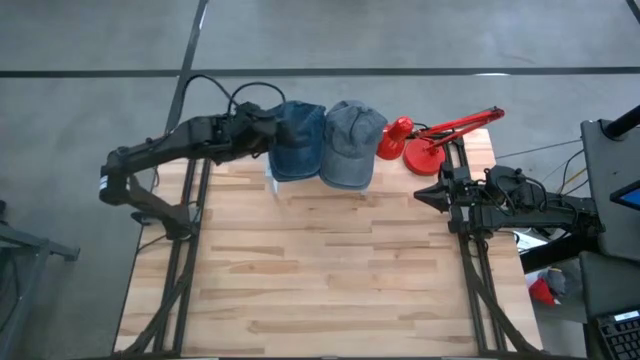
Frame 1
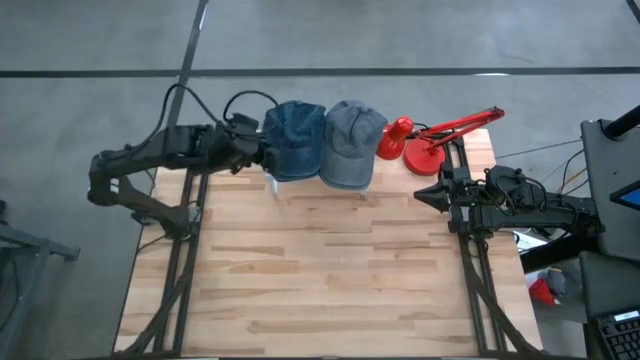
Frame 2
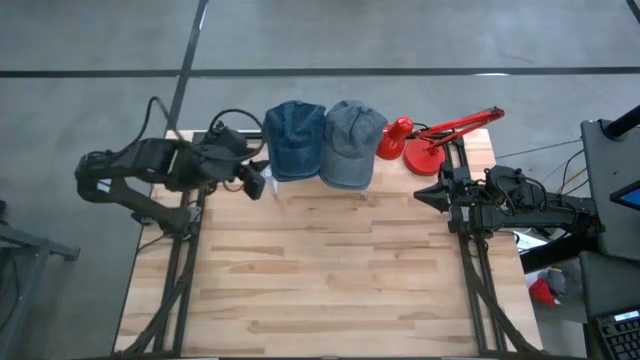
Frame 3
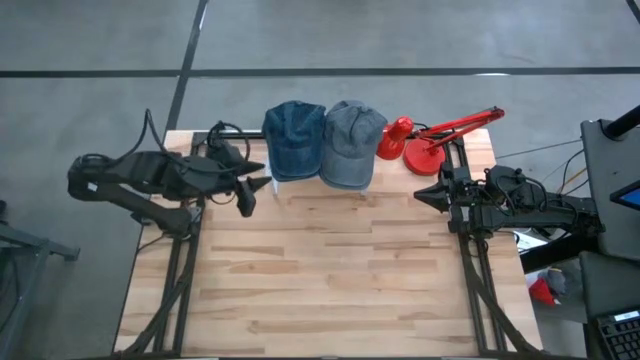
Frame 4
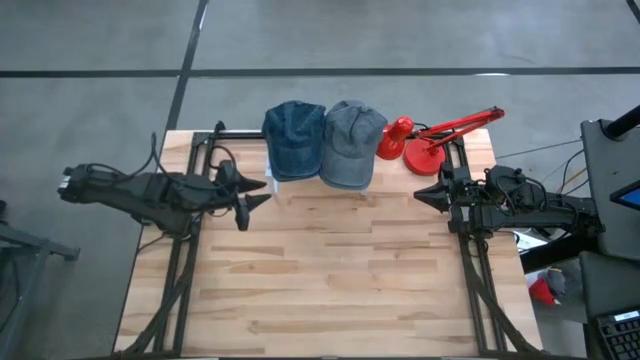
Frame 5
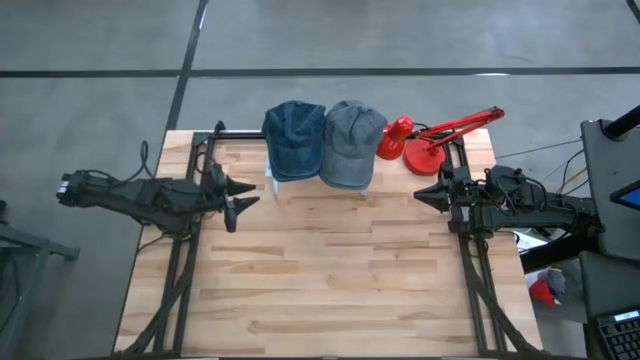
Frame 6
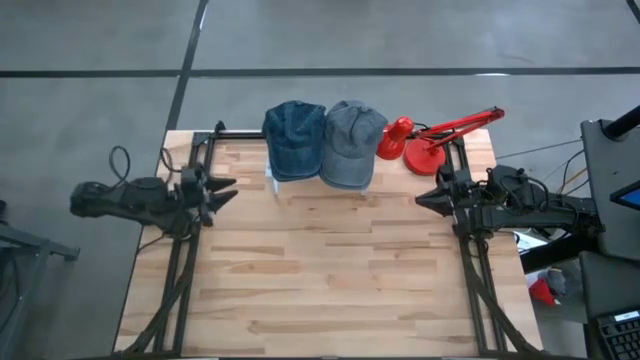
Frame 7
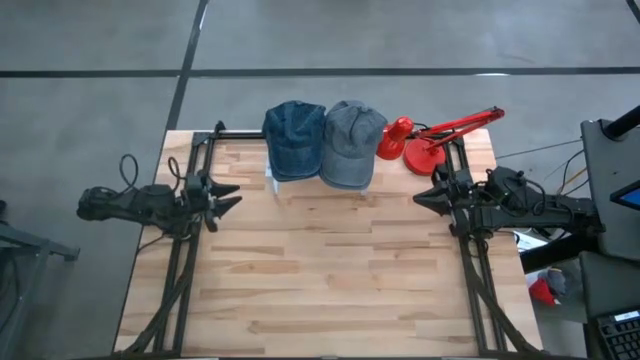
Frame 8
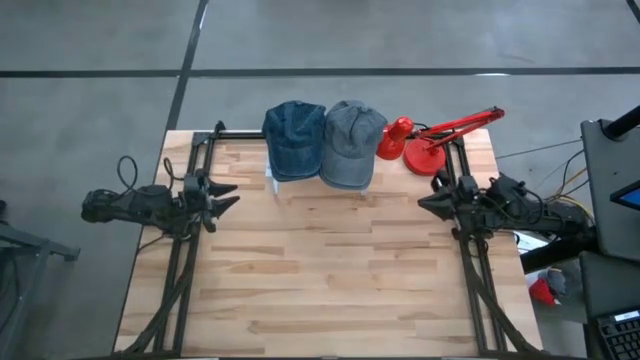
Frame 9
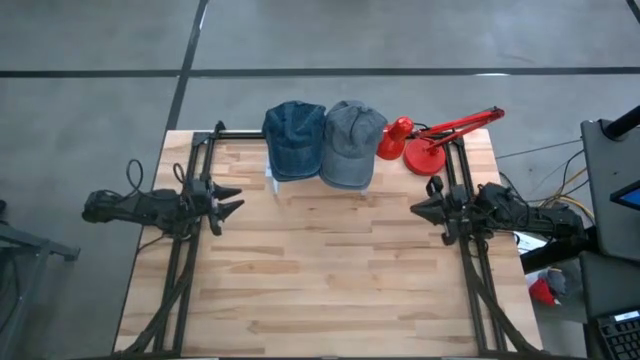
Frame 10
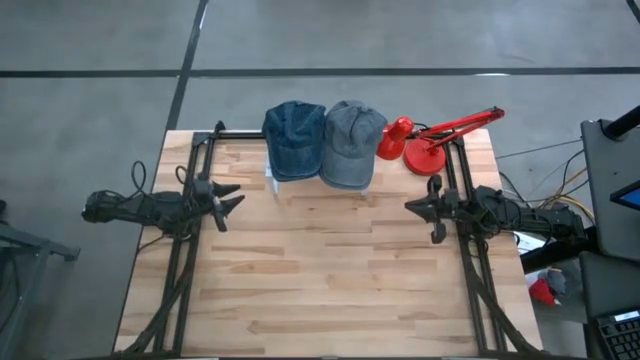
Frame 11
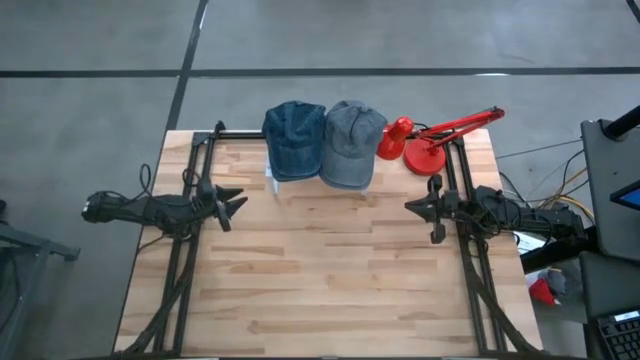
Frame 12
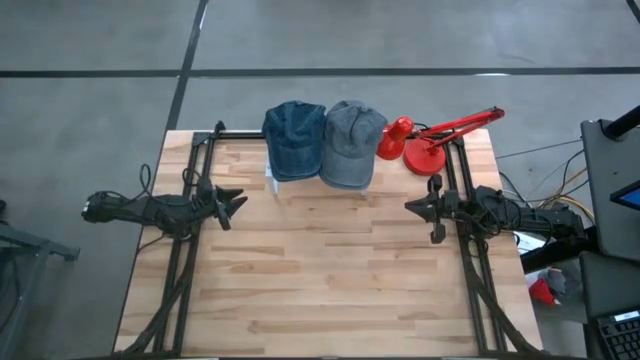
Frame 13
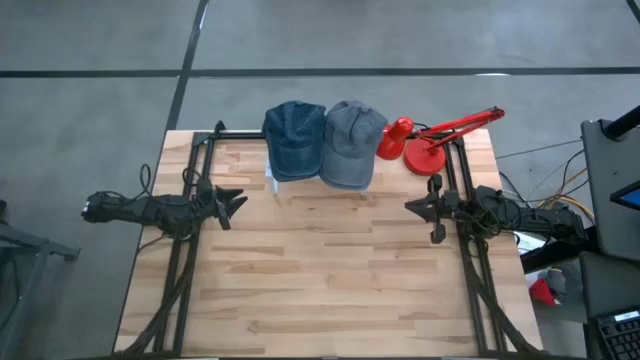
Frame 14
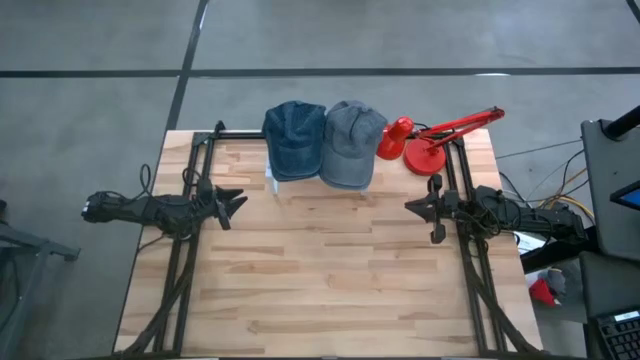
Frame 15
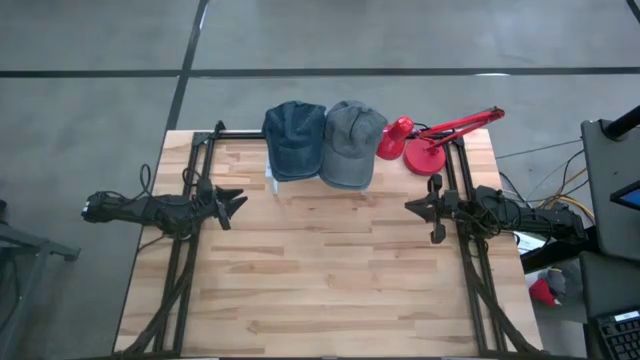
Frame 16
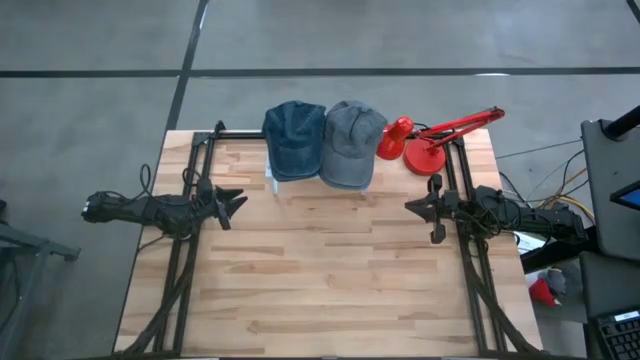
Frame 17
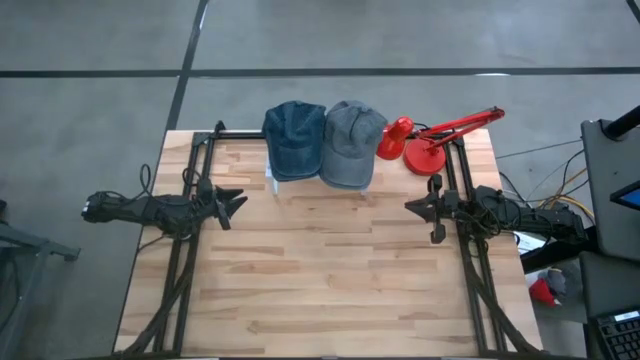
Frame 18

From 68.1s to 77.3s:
Task: Pick & Place hat
Return to Home Position

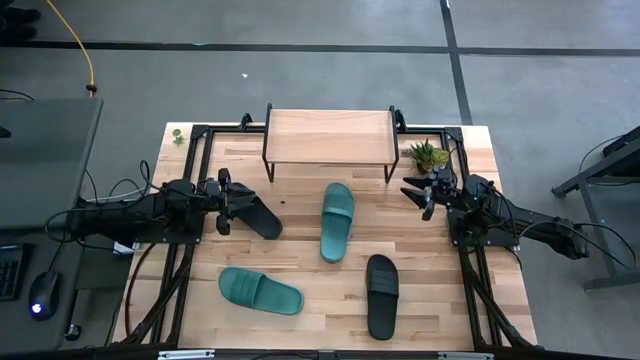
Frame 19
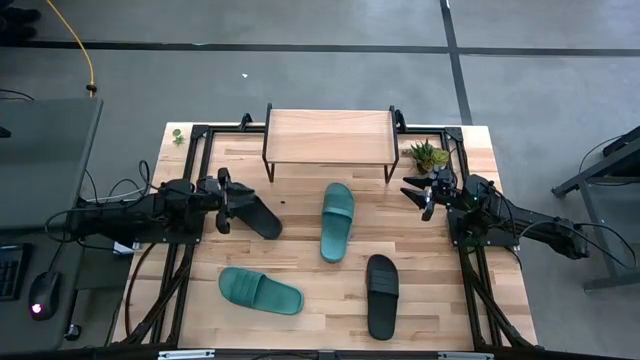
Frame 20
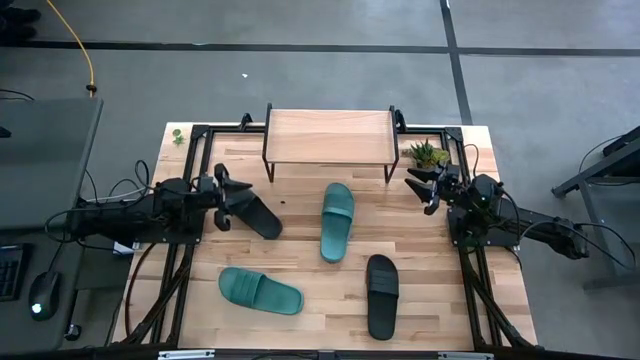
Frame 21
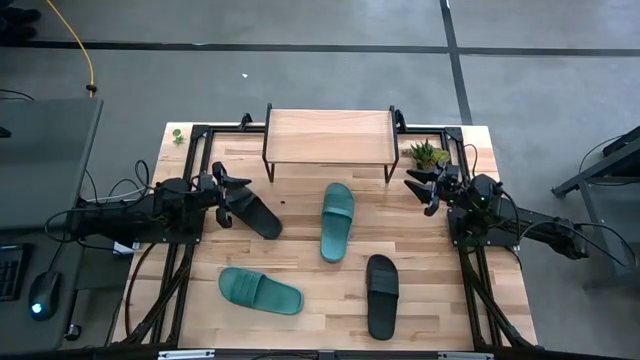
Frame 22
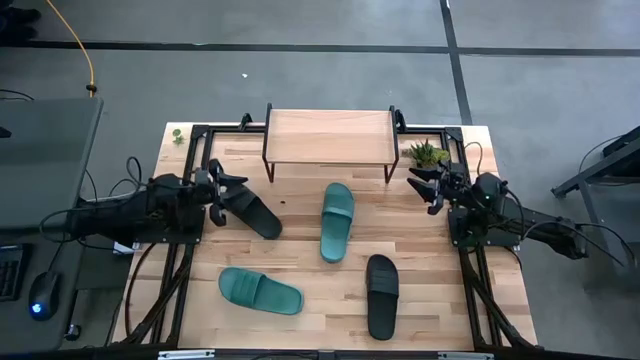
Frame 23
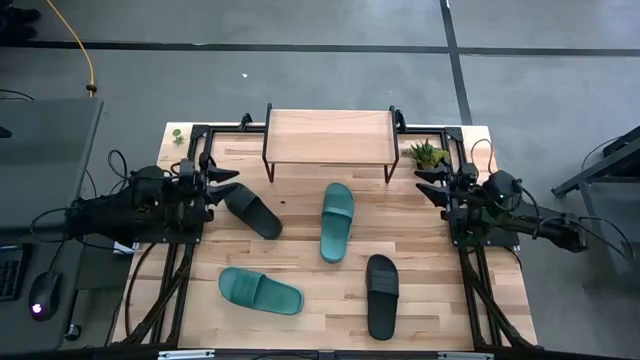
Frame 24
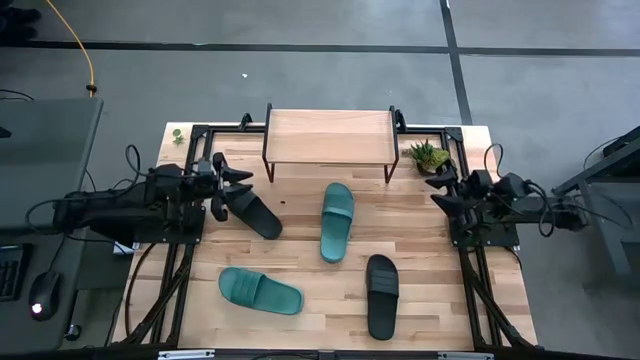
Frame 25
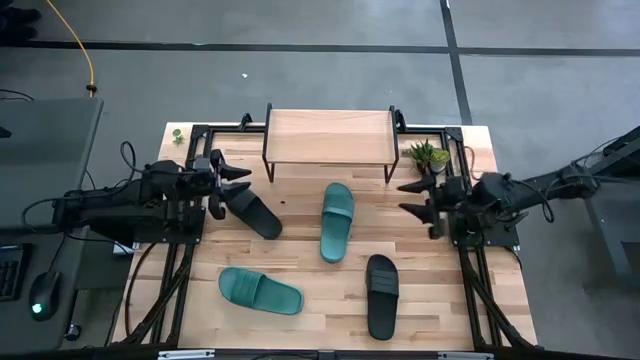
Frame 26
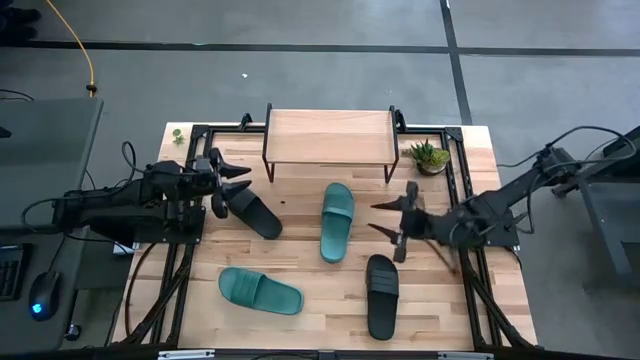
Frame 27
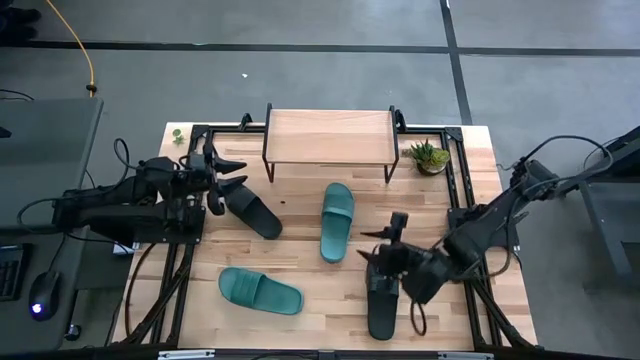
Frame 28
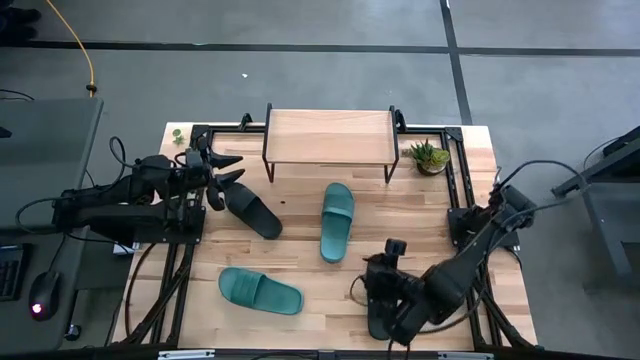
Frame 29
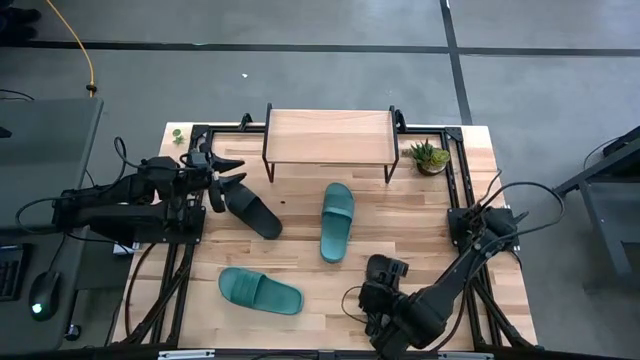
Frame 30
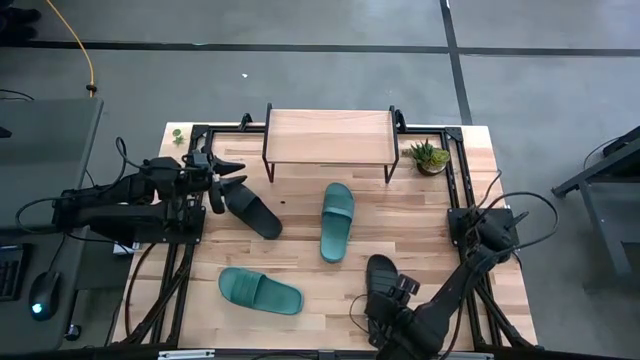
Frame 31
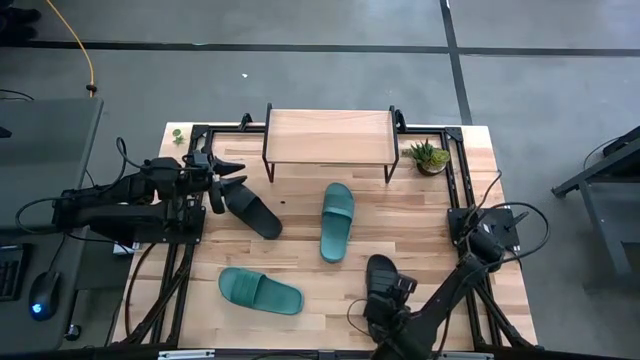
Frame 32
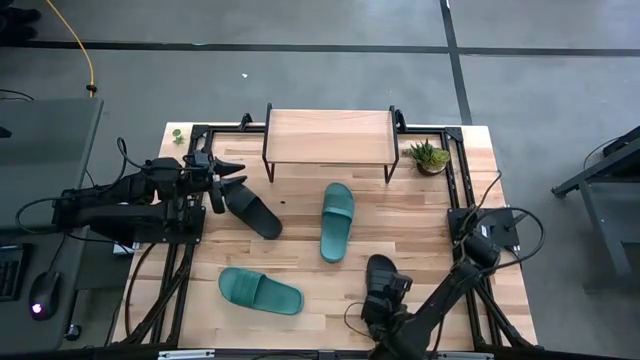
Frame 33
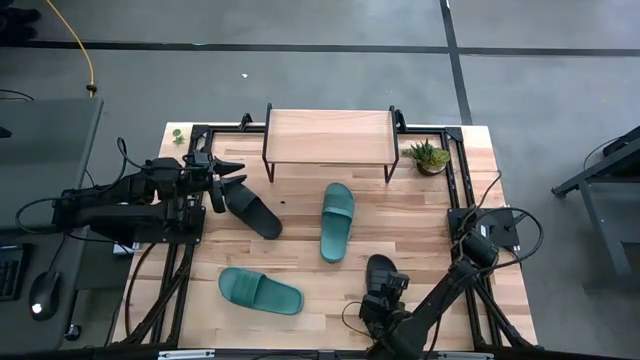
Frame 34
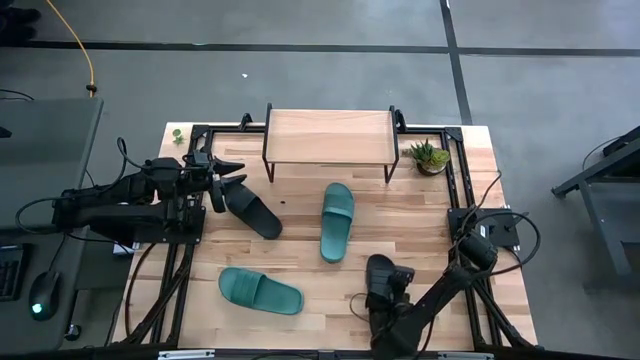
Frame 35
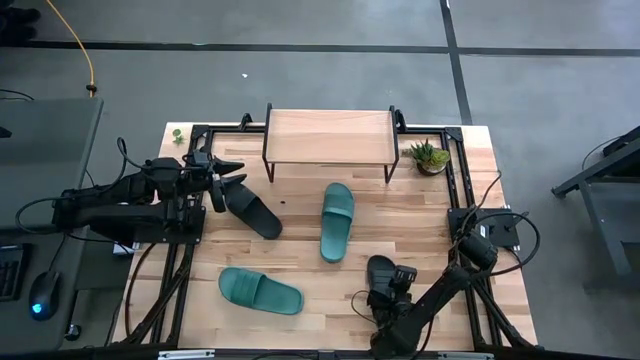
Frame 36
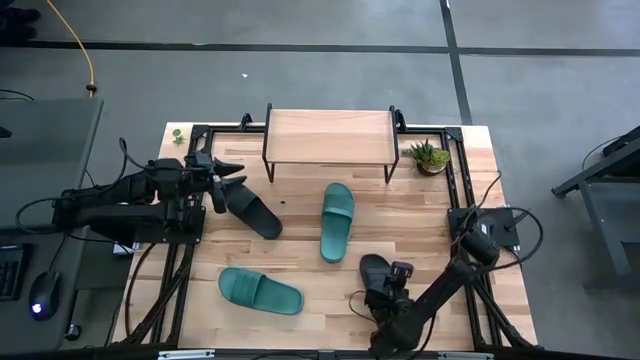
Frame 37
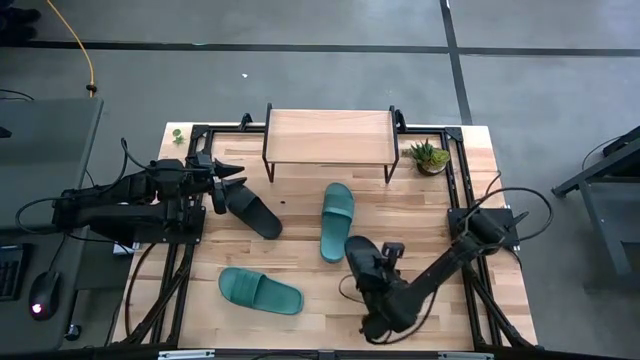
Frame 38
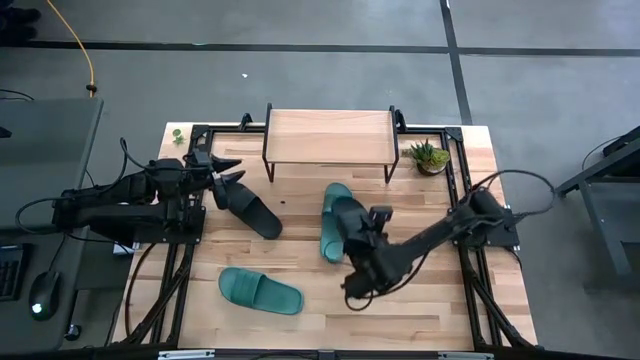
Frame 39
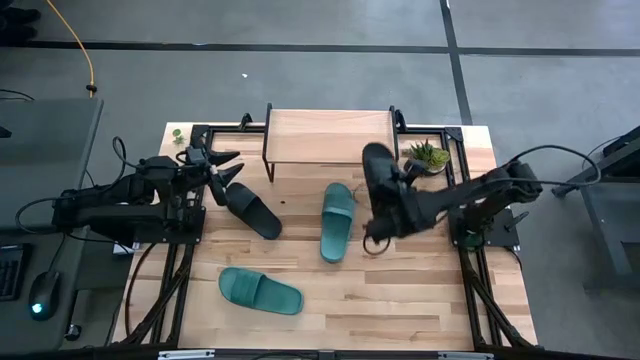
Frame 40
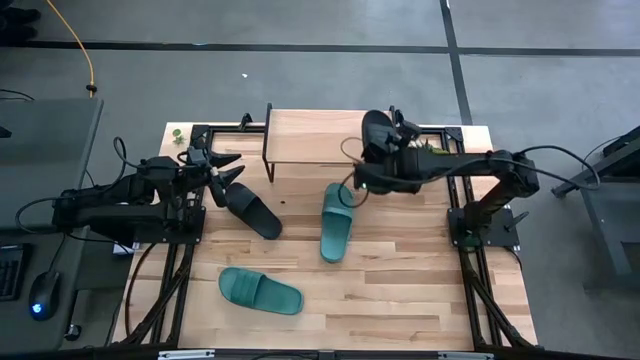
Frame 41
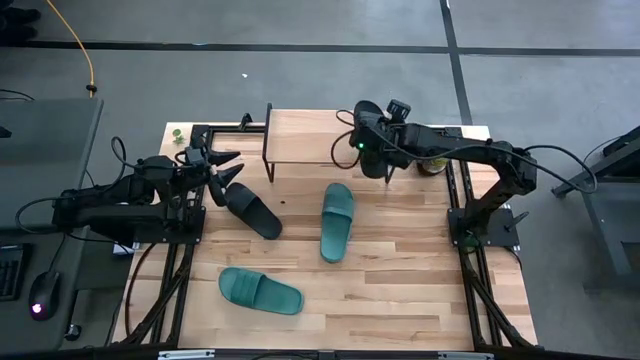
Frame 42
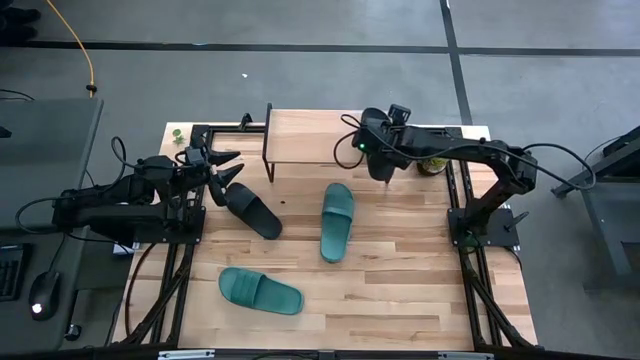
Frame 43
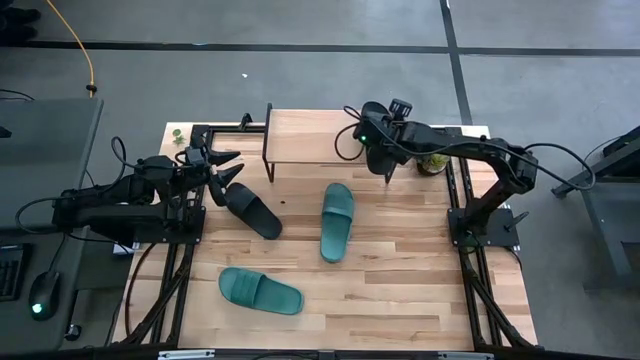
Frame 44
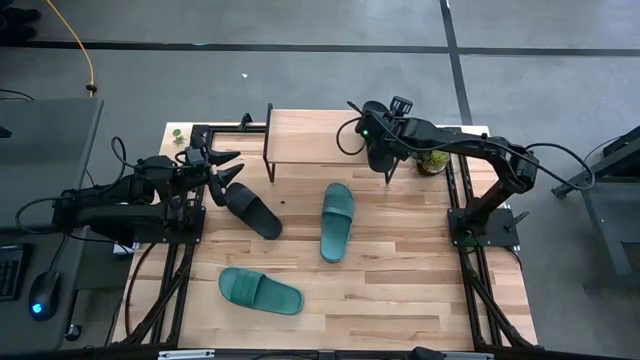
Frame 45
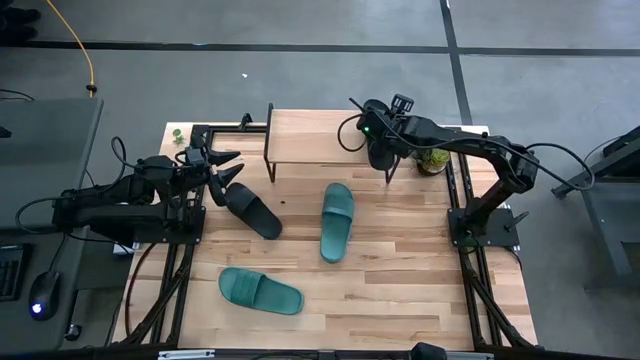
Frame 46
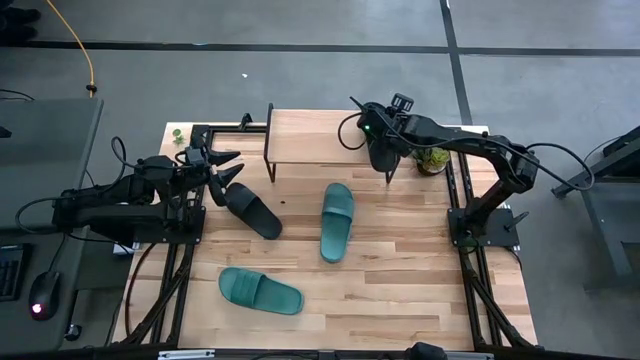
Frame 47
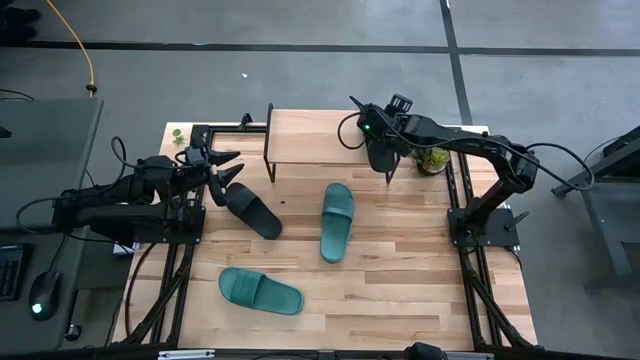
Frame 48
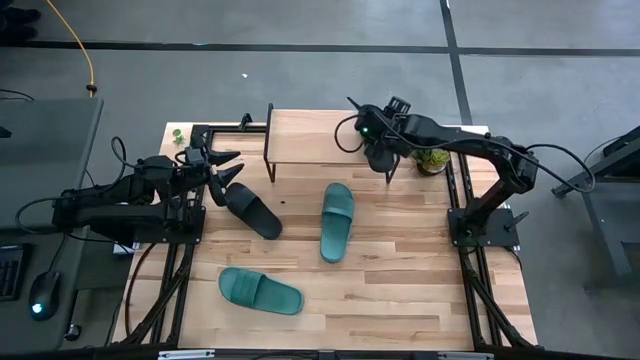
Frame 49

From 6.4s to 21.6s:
Task: Pick and place slides into the shelf
Put the bottom black slide on the shelf
